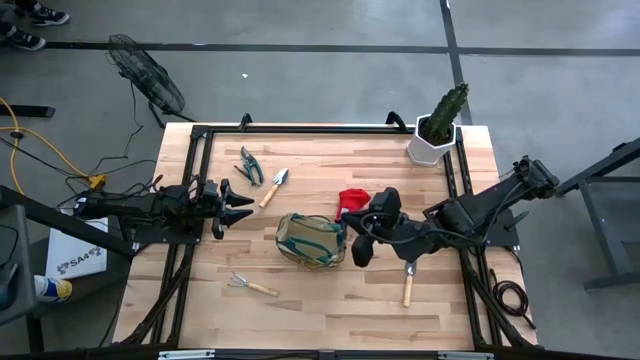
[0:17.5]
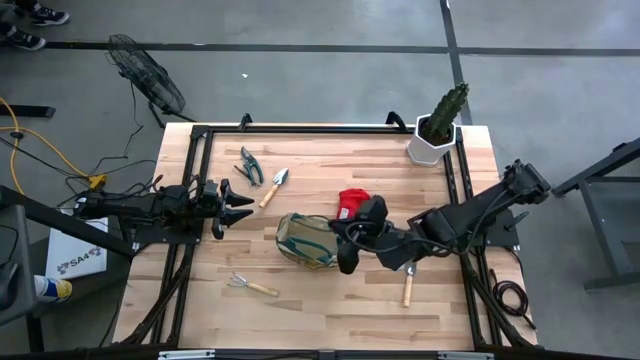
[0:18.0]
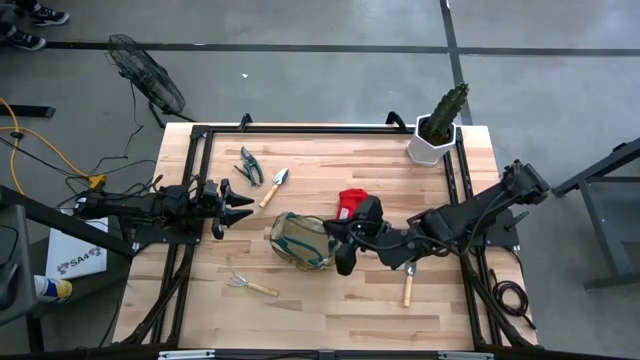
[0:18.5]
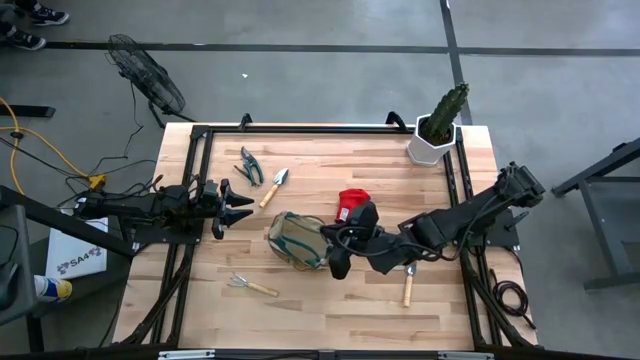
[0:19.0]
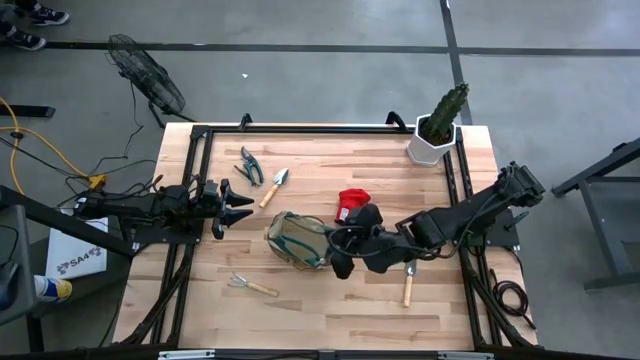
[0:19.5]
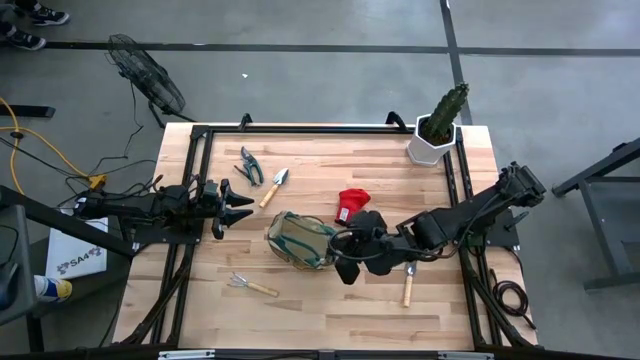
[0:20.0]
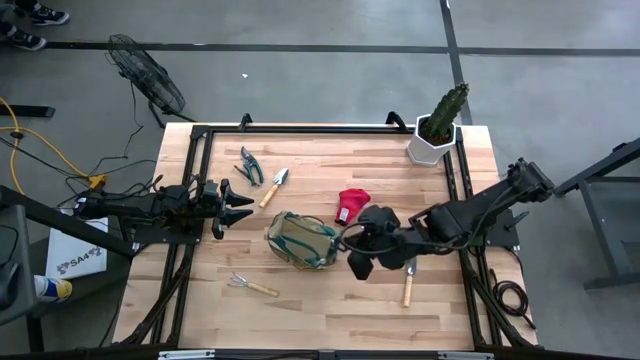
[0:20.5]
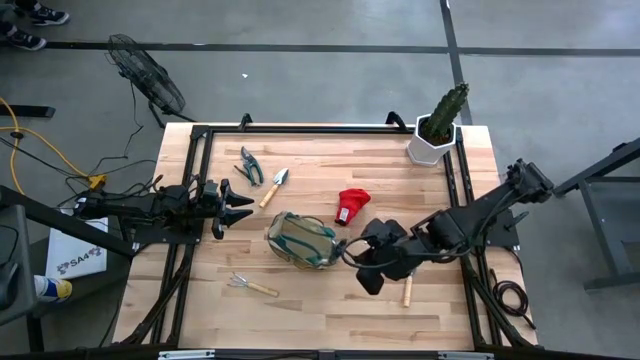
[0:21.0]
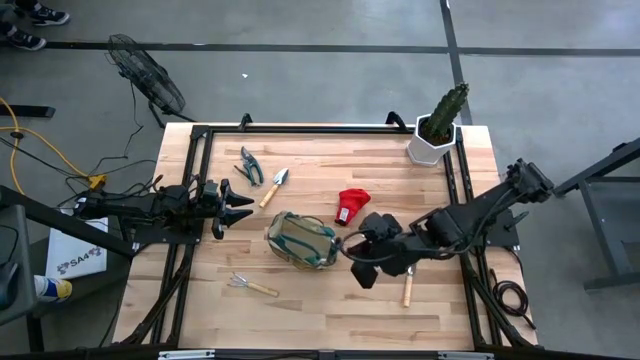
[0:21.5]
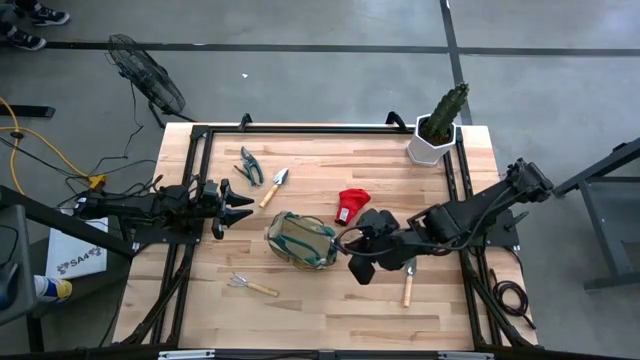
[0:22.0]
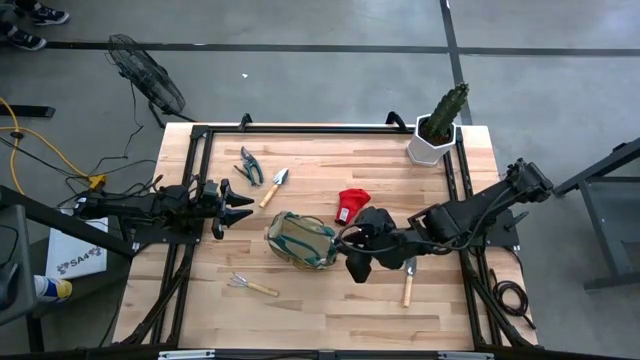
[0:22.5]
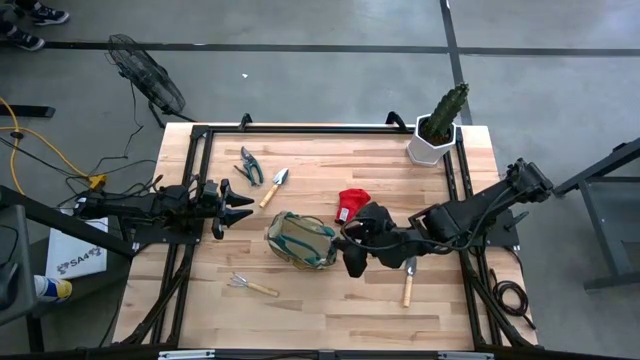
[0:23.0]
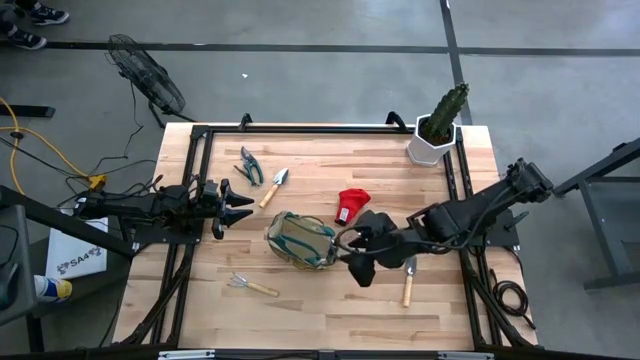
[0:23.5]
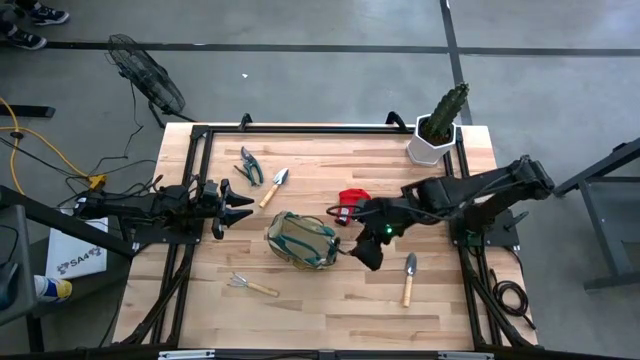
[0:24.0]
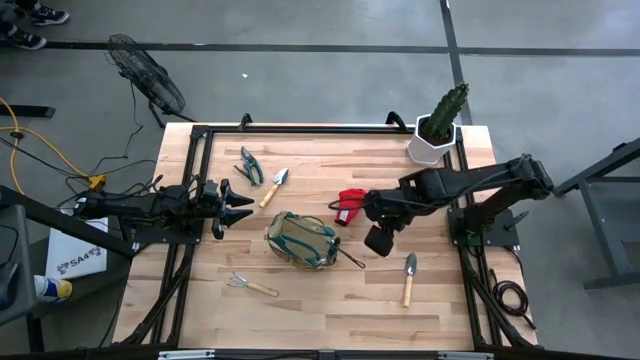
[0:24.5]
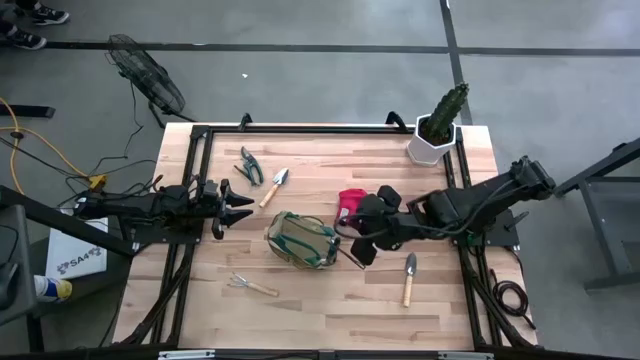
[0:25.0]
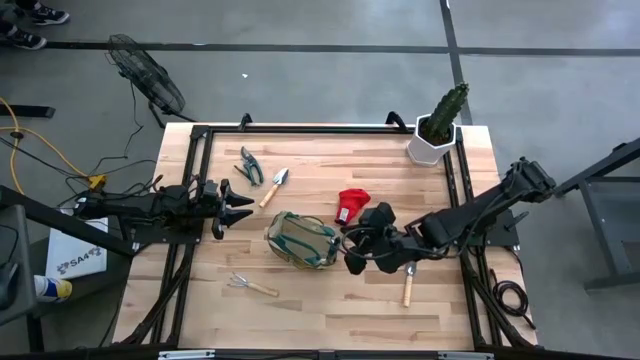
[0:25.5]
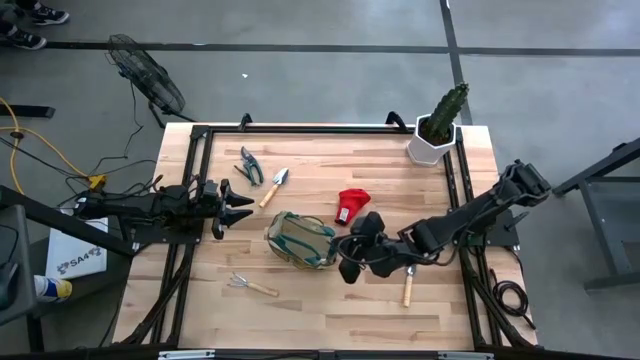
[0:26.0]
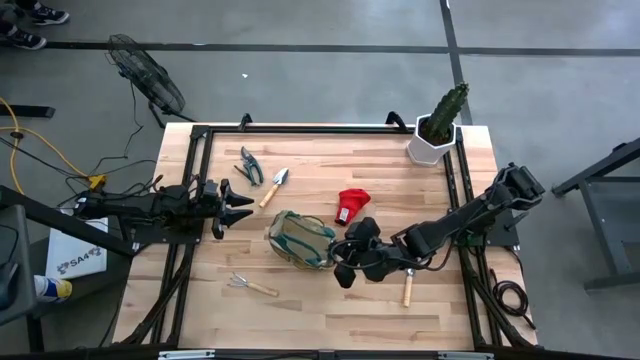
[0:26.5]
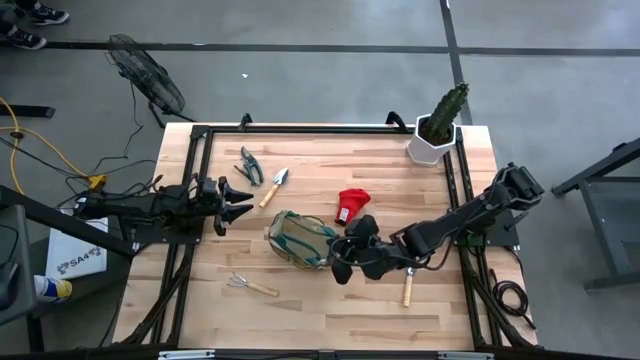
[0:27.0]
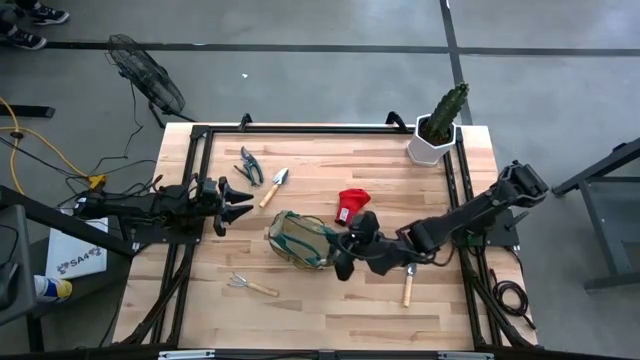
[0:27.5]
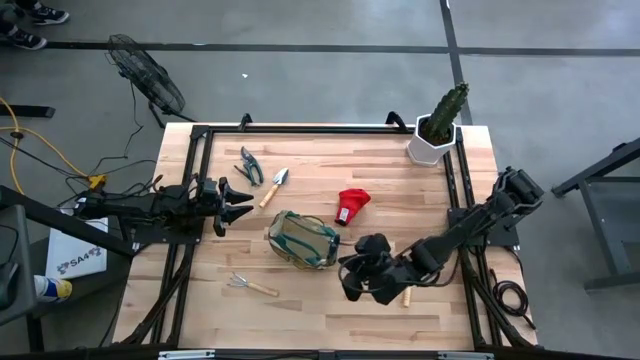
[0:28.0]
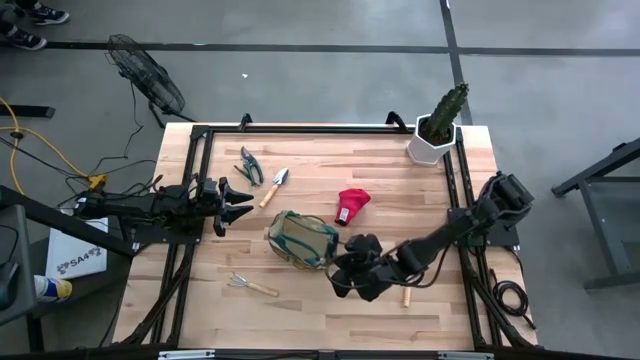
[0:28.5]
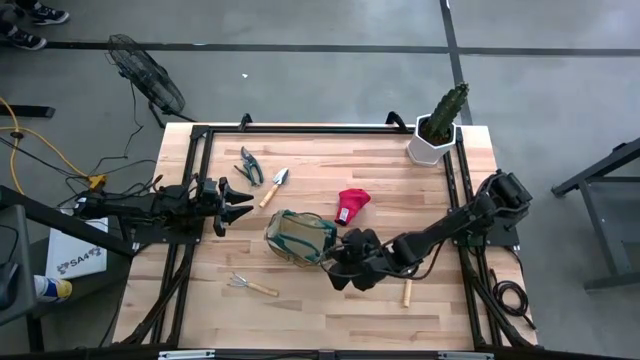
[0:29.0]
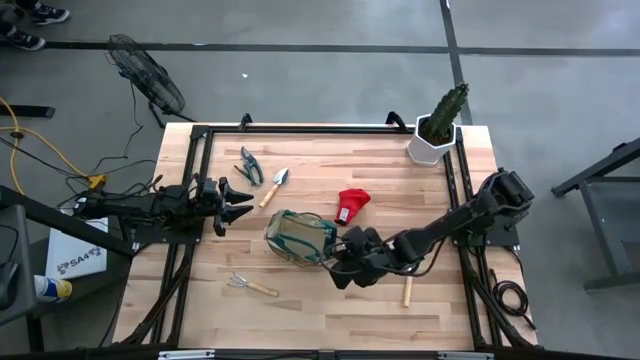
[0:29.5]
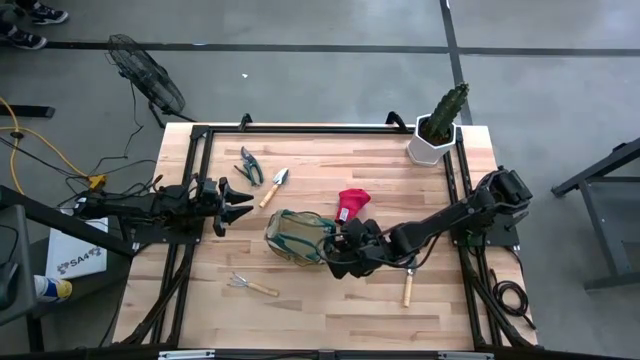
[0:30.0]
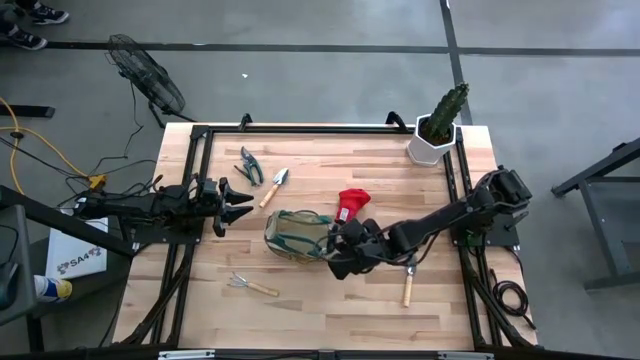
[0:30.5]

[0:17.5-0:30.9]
Task: Pick & Place Garden tools in Gardening bag
Put the green right shear scissors into the gardening bag

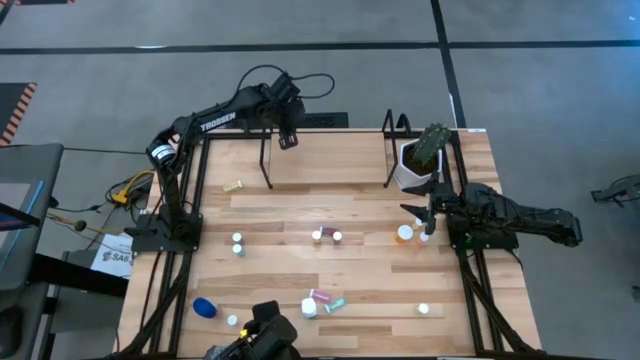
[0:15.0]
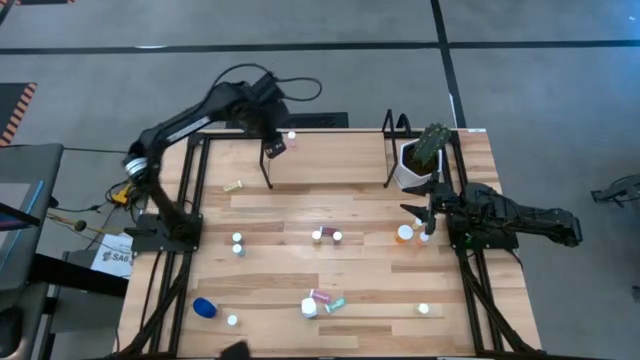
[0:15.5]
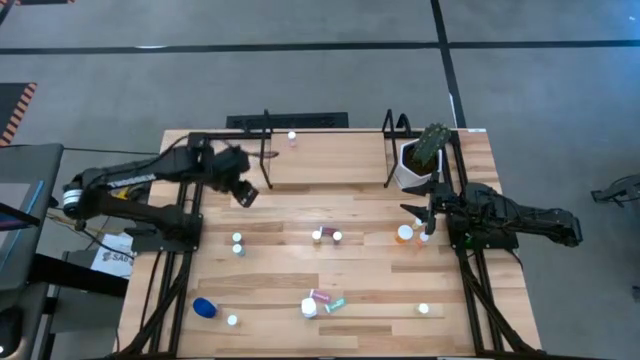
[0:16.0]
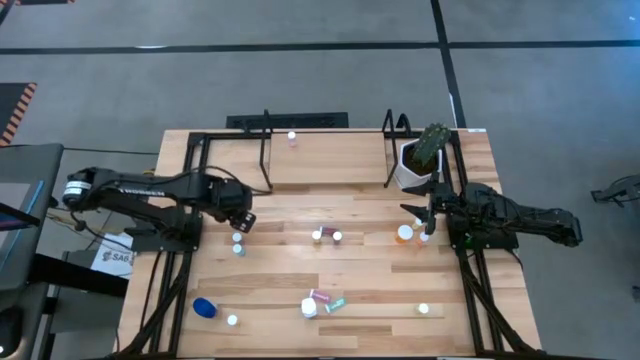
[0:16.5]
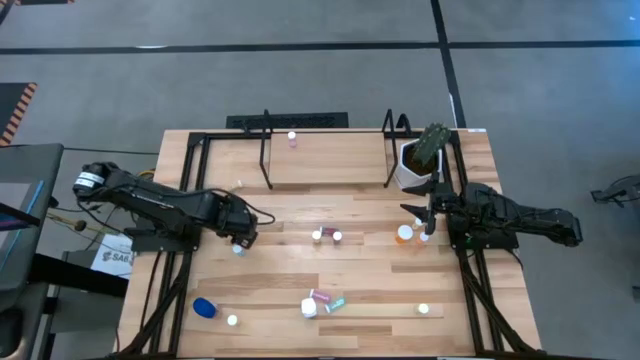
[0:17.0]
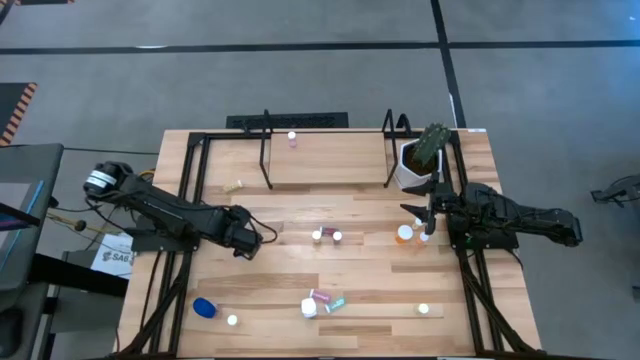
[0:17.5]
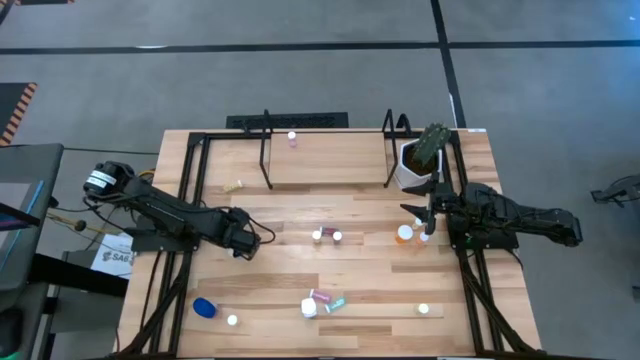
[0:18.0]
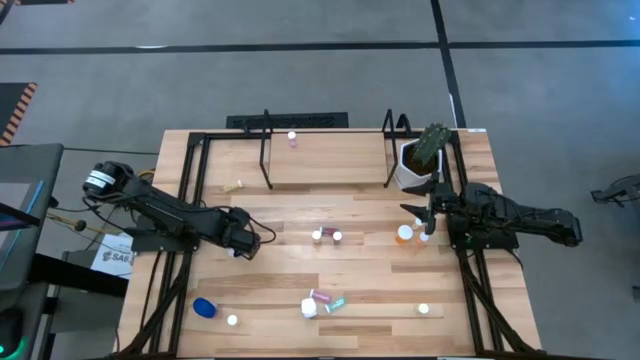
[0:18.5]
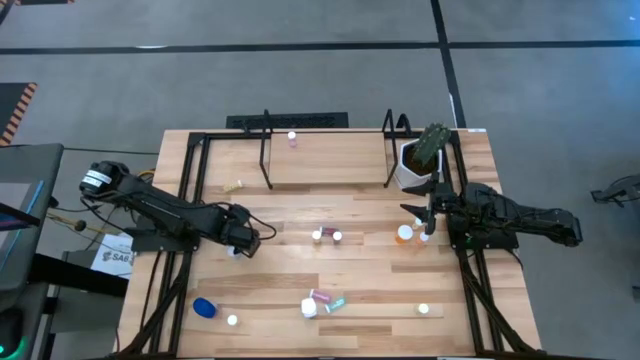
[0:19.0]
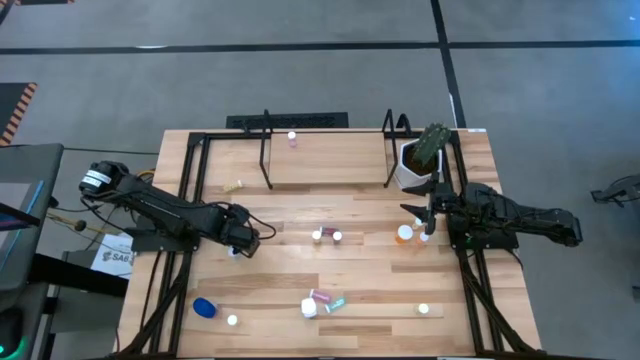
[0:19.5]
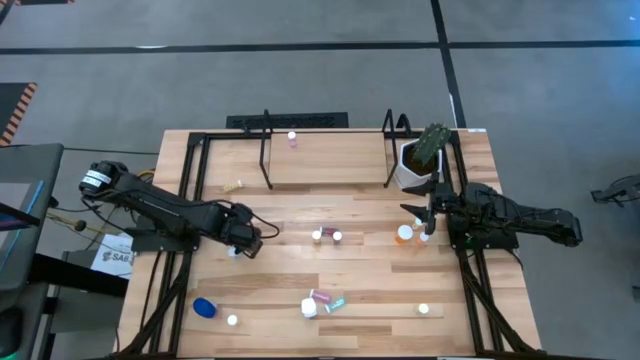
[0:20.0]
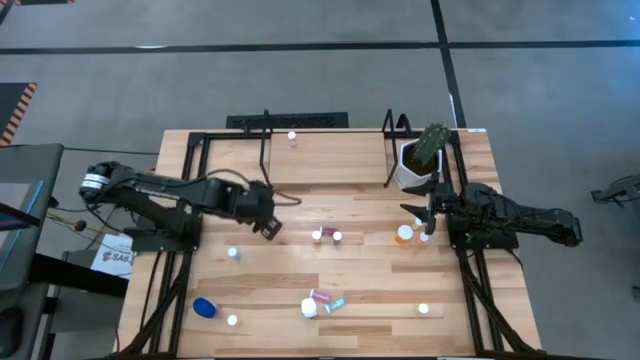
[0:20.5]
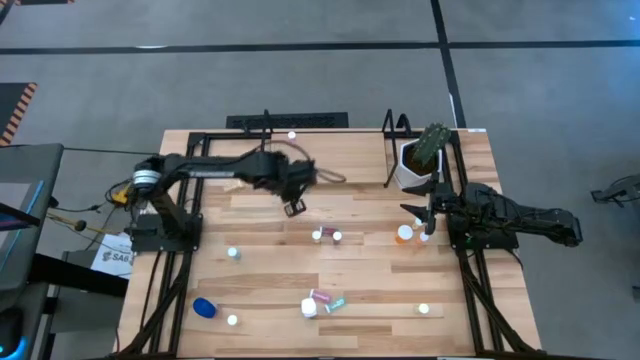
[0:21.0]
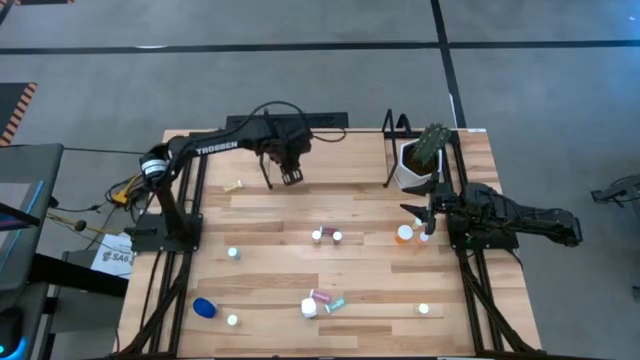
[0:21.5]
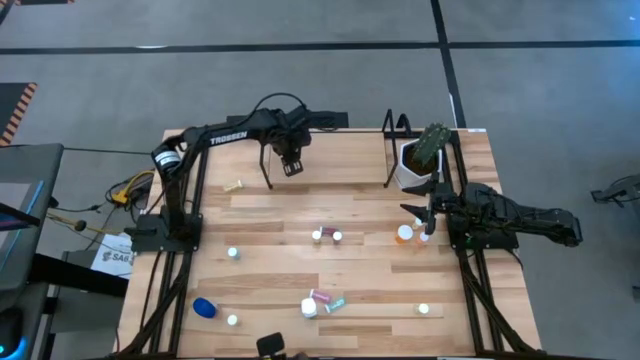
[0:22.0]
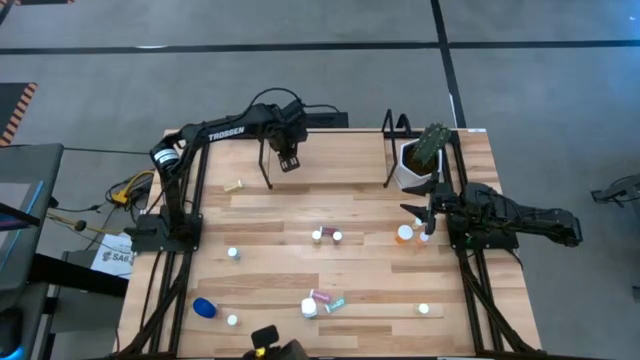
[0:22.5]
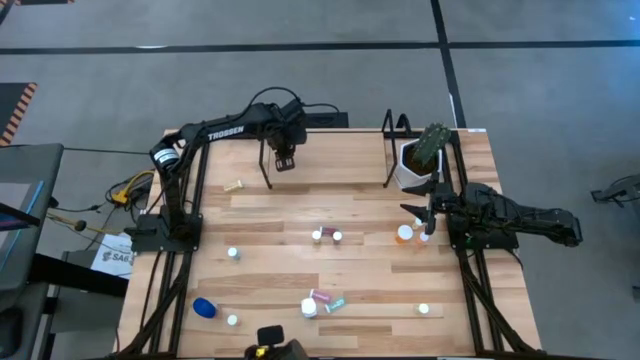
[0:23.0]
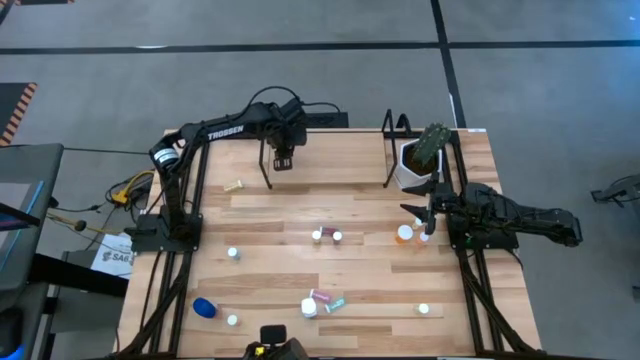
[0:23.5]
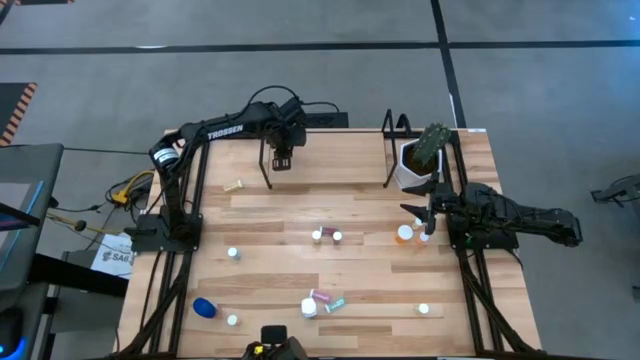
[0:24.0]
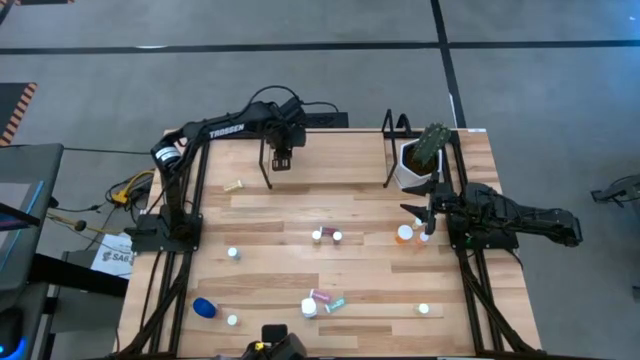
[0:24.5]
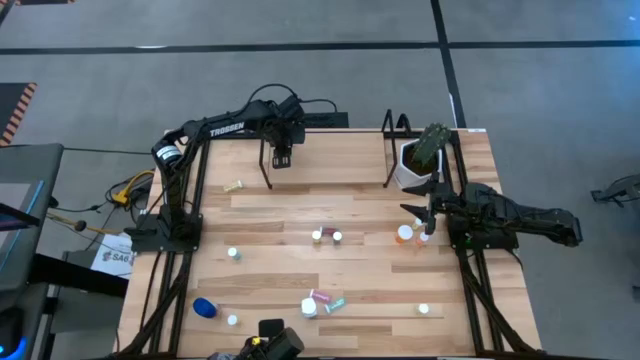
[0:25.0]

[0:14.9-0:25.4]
Task: Pick and place medicine bottles onto shelf by color
Put the blue pill bottle on the shelf
